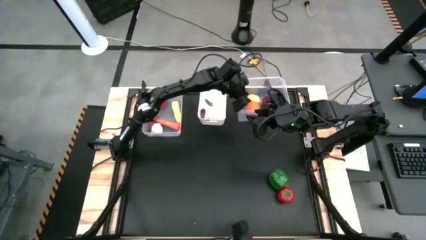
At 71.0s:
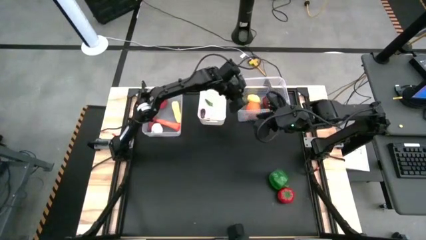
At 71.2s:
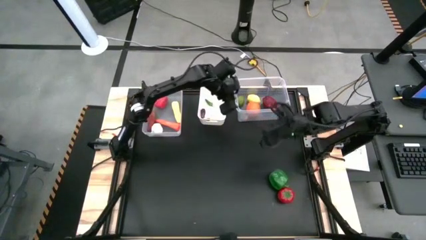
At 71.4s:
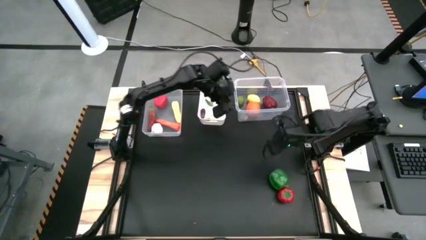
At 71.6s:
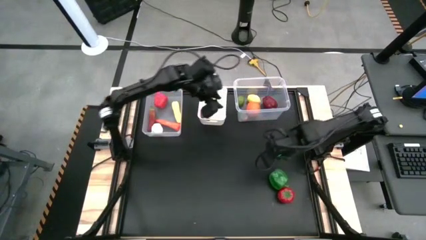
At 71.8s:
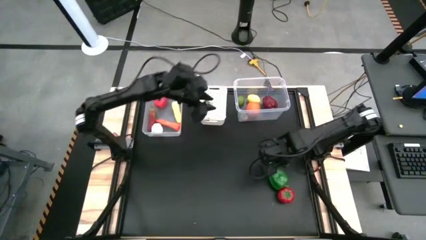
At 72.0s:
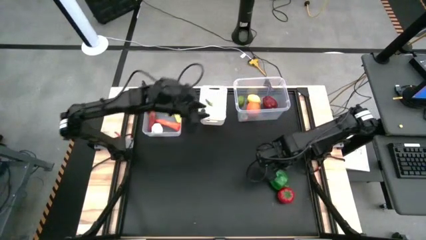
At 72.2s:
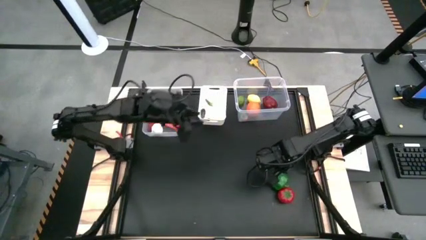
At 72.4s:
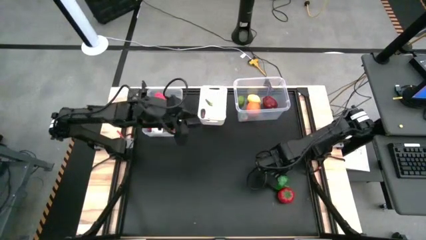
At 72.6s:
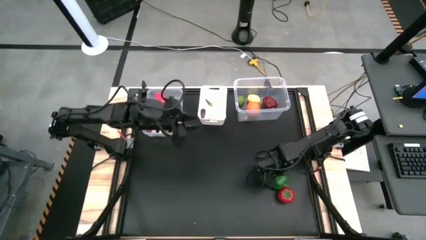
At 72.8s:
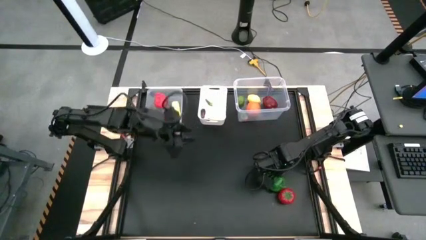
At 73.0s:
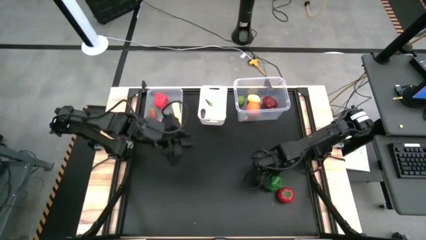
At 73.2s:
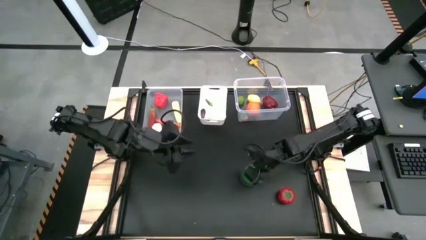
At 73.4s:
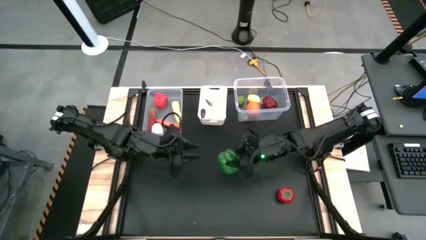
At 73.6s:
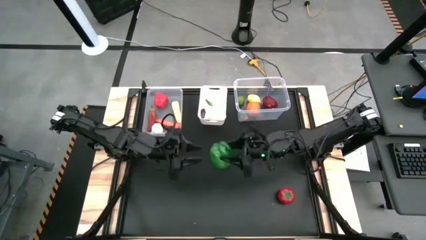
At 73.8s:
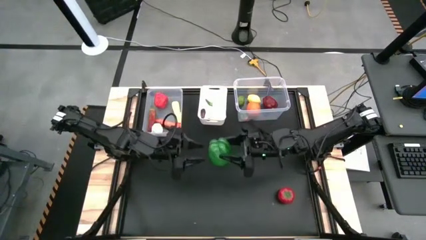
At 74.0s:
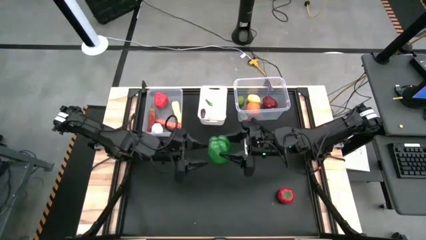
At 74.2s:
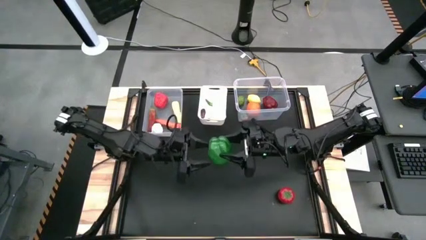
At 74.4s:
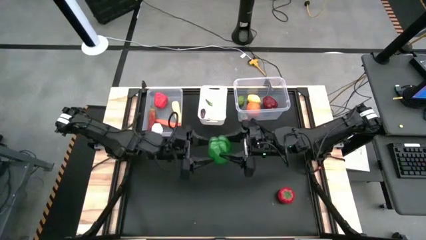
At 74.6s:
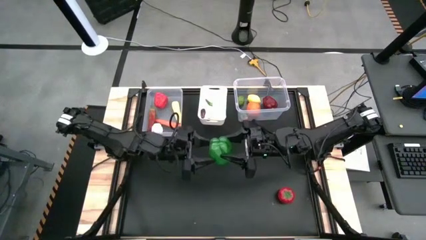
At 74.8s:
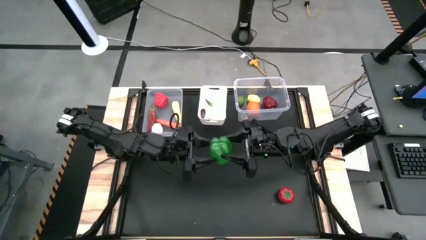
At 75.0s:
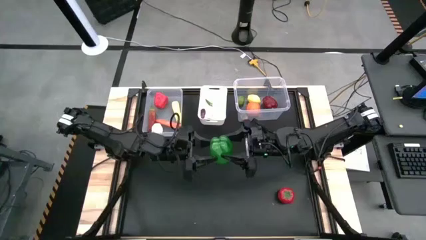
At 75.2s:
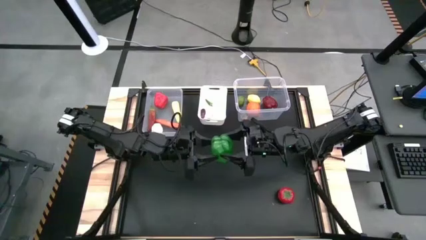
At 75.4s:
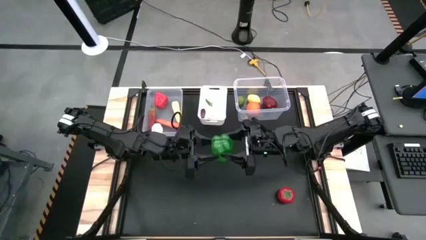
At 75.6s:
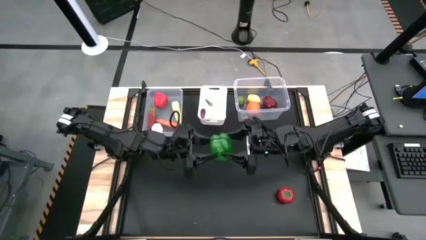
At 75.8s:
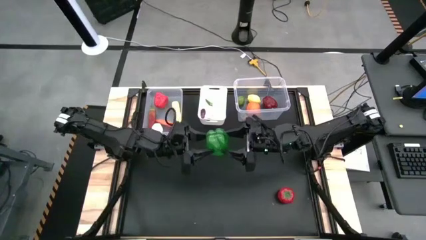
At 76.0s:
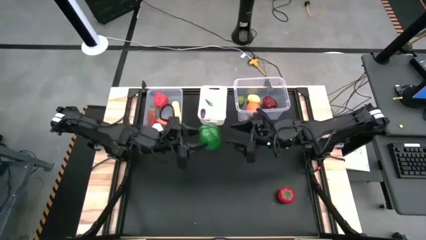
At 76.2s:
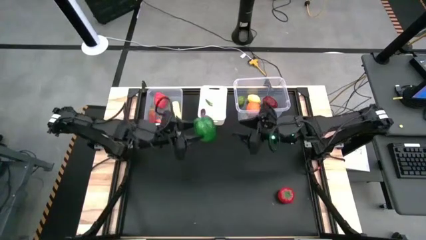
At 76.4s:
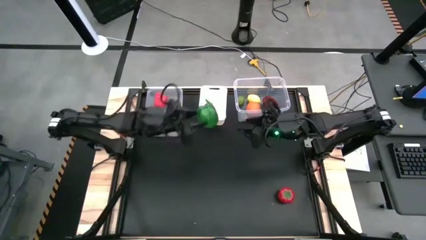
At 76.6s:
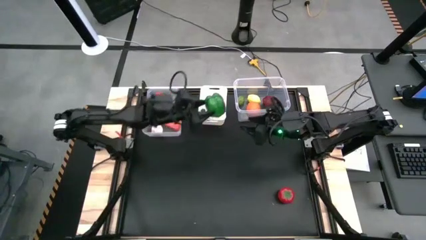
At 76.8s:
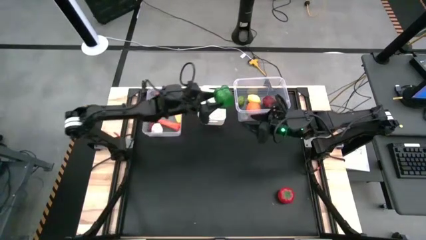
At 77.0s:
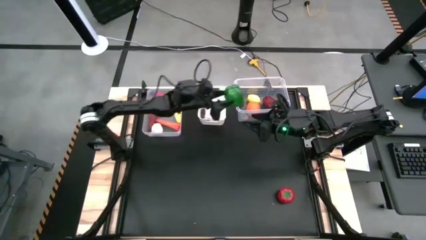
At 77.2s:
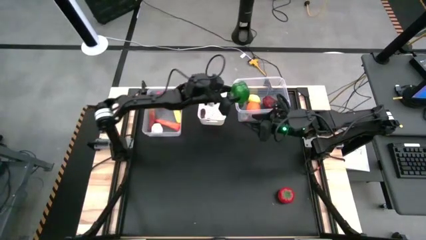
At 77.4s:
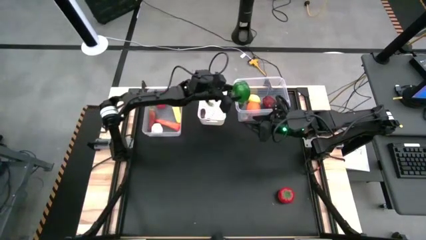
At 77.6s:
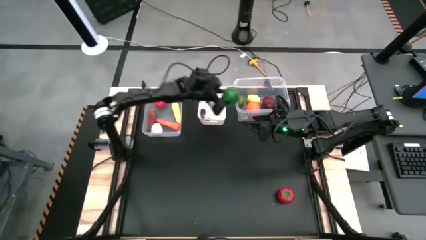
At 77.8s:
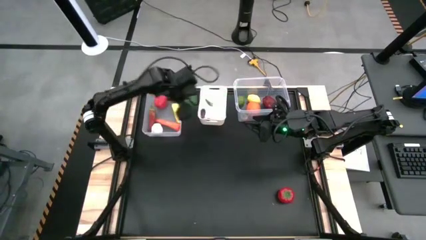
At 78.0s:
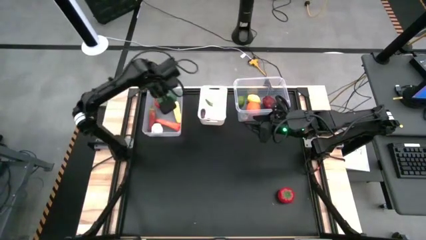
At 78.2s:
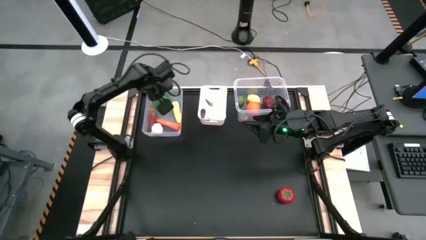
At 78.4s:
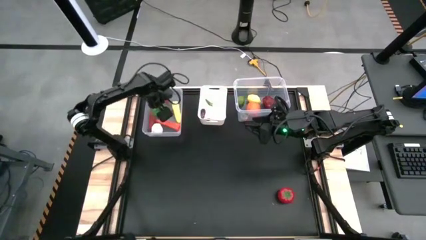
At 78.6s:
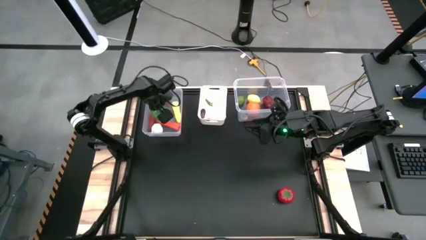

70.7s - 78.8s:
Task: Sort produce into baskets
Put the green bell pepper into the left transparent bin

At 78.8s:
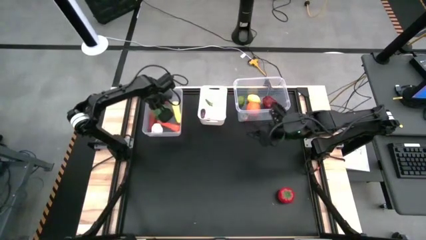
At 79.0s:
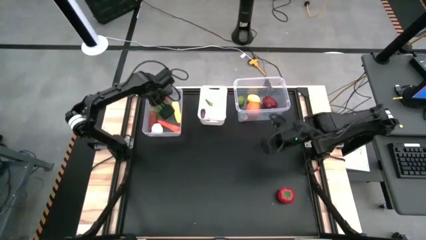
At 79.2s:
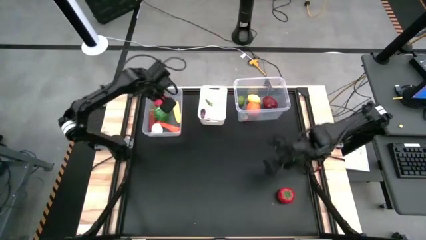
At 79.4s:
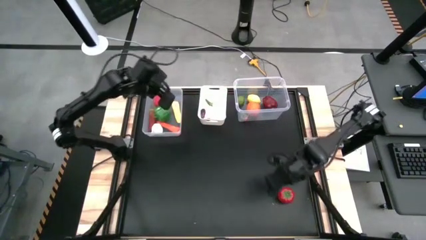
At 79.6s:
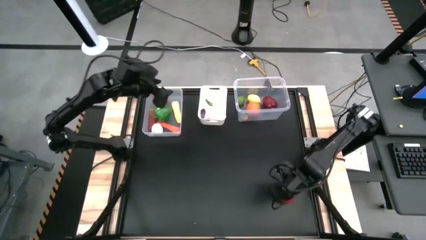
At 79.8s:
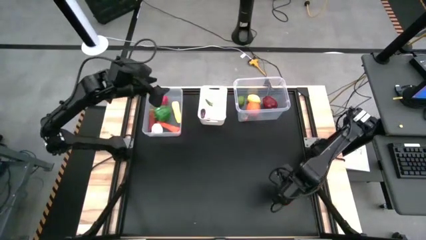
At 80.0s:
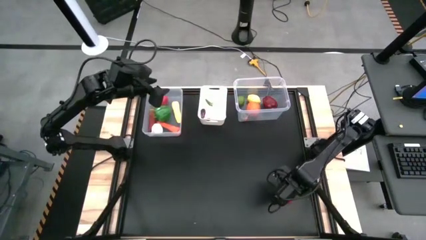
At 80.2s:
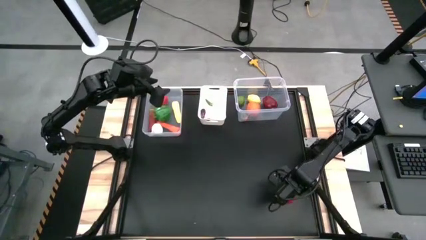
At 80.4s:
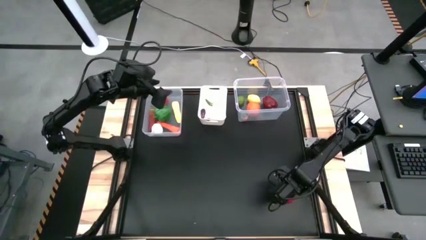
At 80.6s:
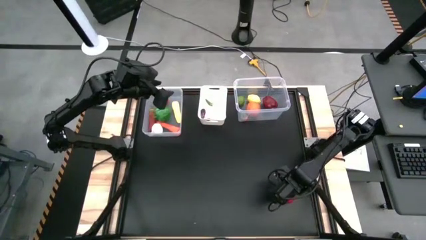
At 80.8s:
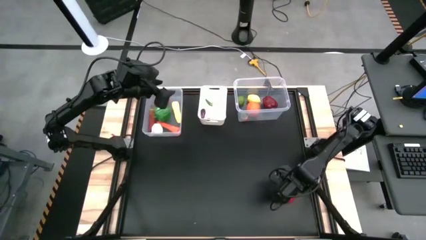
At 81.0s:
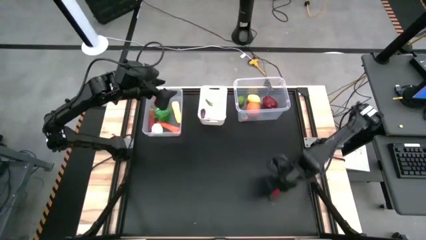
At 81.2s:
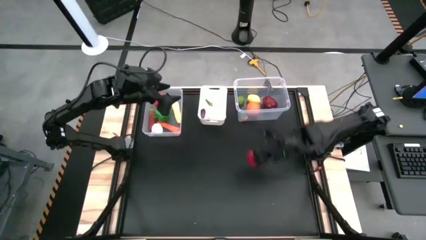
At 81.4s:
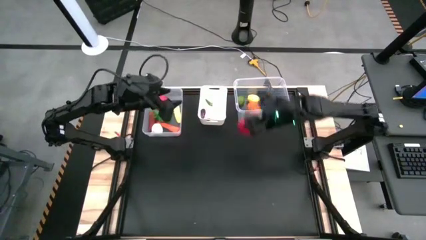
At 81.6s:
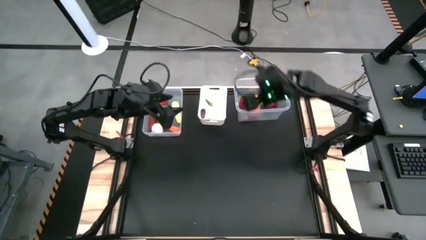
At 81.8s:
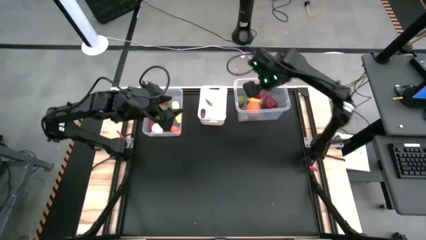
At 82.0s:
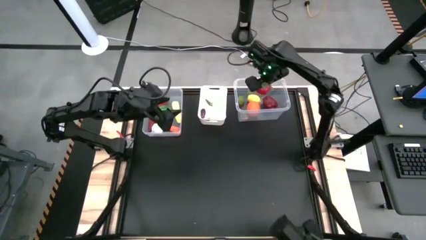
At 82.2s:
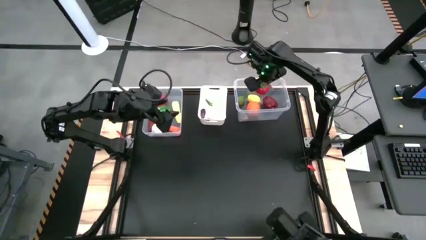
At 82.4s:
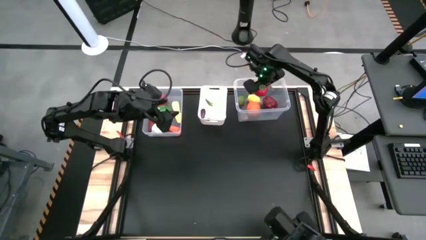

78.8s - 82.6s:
Put the red tomato into the right transparent bin

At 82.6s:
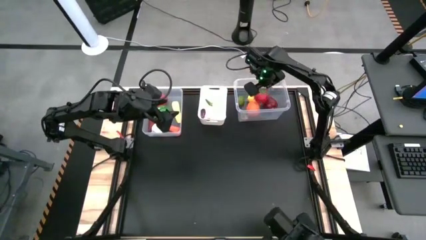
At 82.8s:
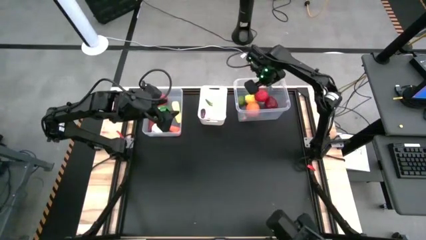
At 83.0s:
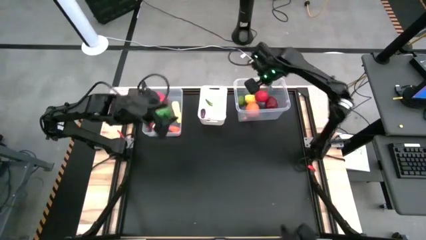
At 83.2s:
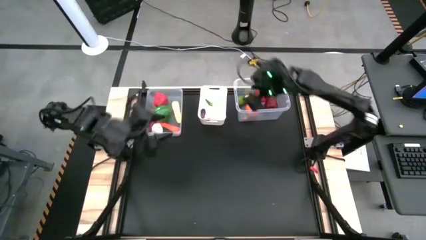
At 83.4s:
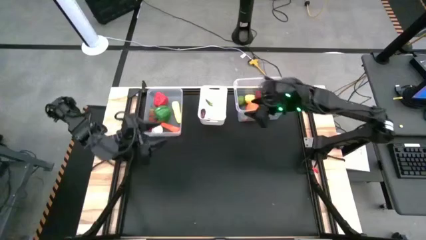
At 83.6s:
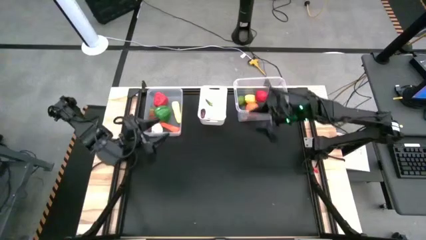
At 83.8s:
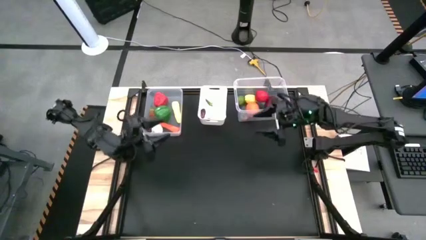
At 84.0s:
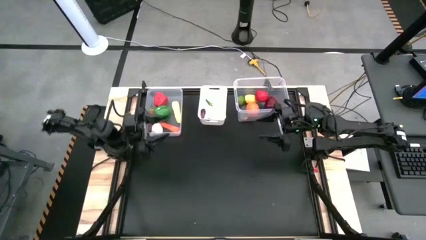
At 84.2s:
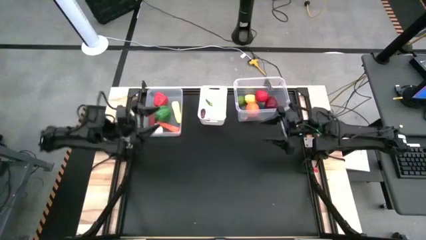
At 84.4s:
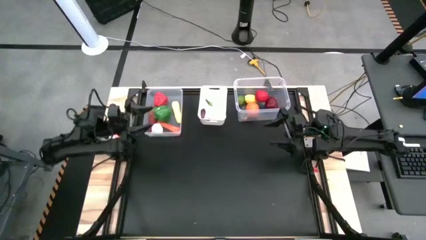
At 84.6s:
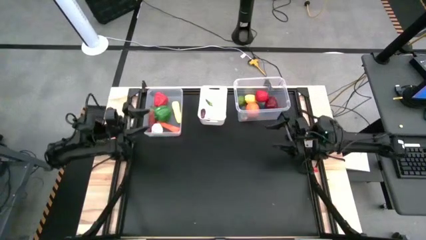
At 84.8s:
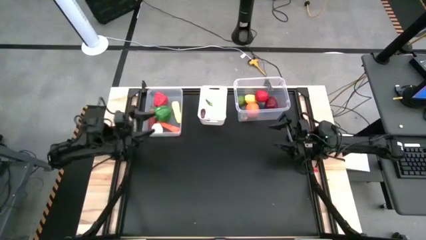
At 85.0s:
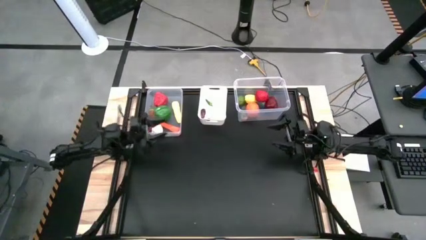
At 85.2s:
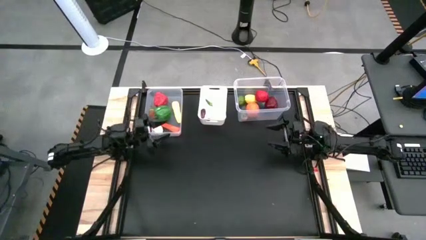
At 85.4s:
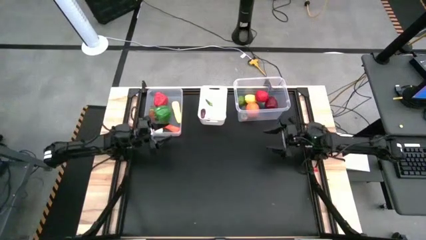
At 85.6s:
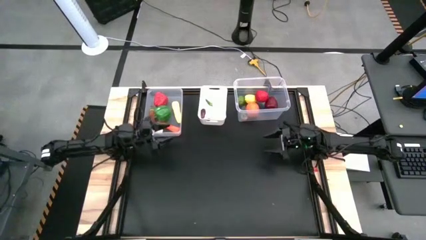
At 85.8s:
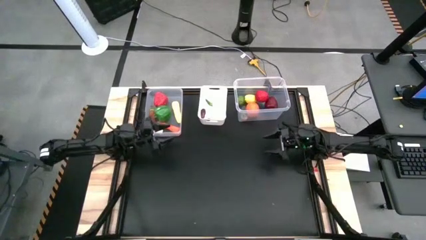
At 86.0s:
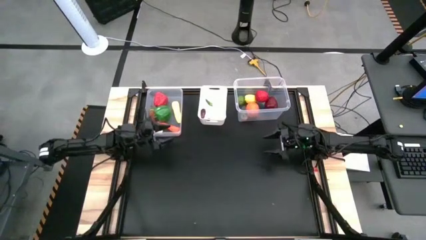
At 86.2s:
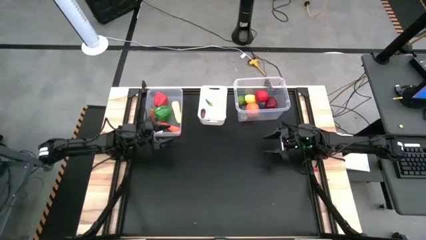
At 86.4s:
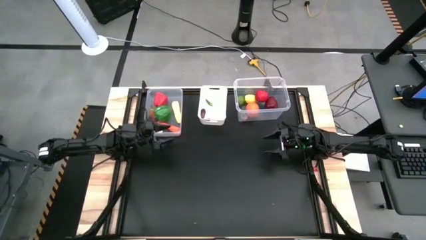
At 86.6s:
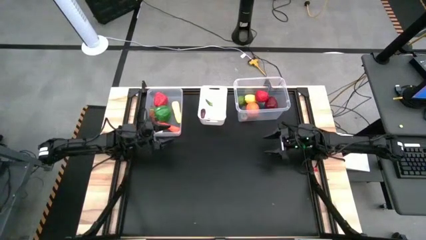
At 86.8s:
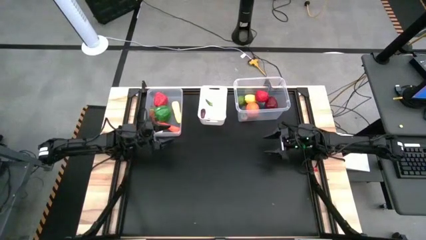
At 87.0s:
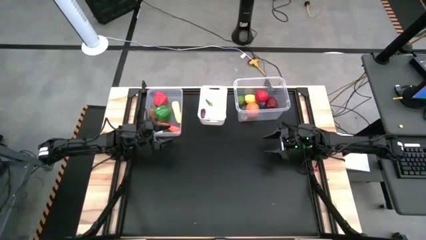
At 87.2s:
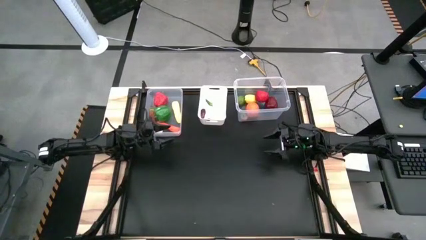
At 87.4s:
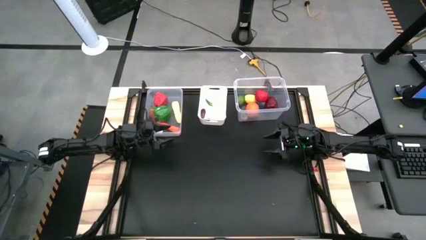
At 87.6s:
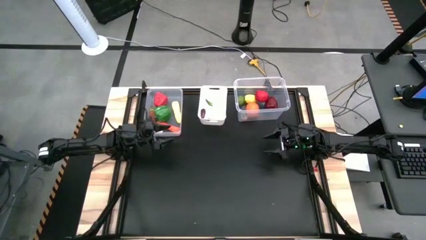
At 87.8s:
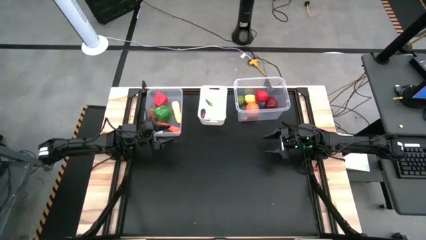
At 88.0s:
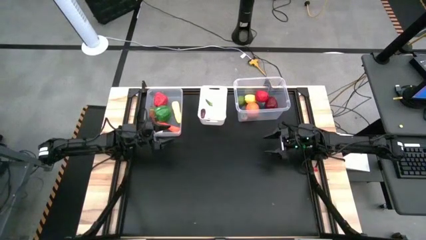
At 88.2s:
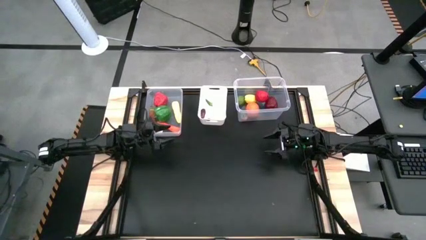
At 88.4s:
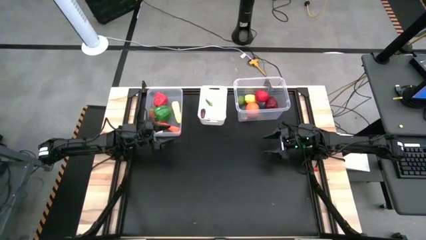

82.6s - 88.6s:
Return to home position
